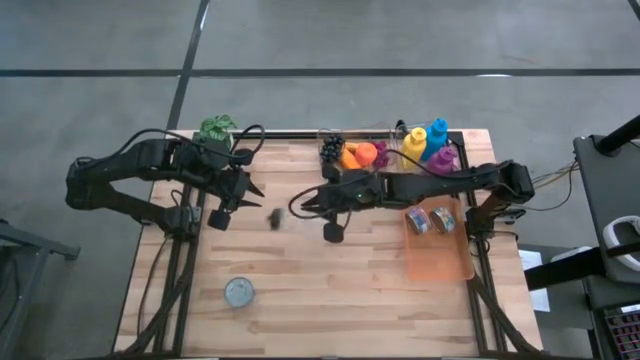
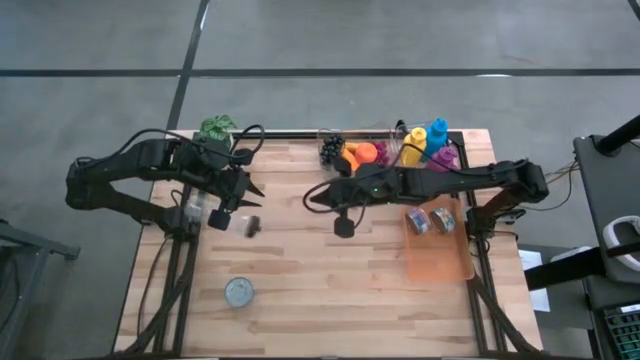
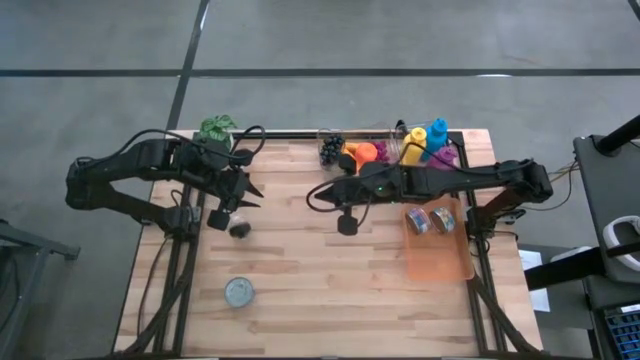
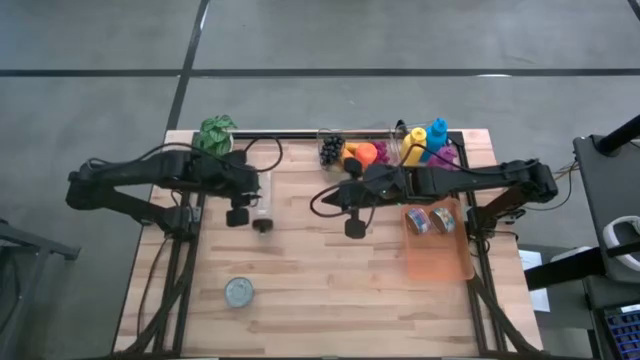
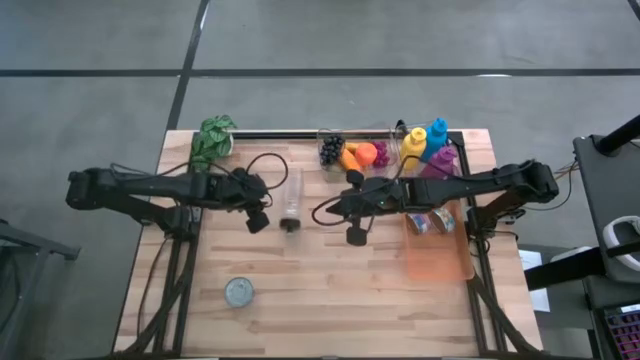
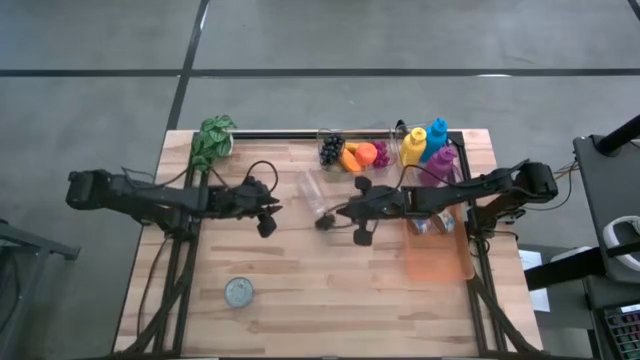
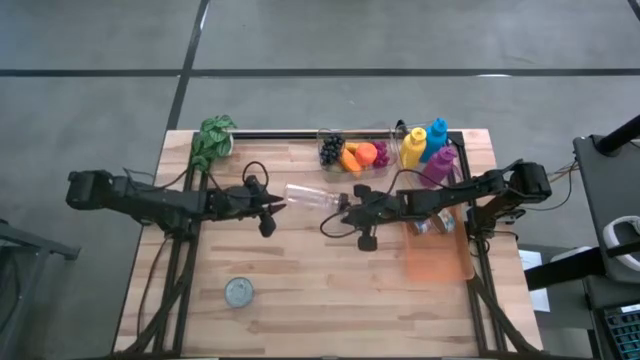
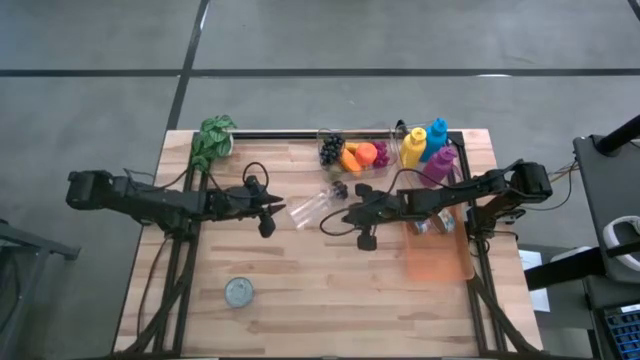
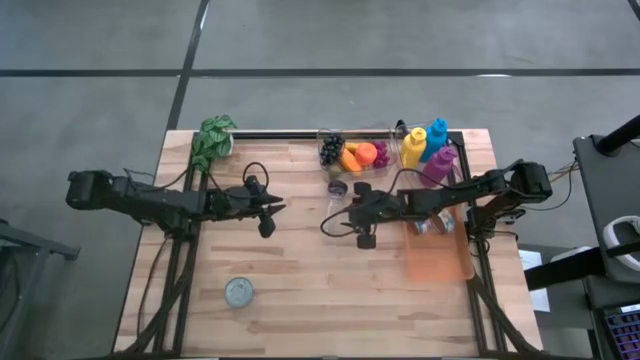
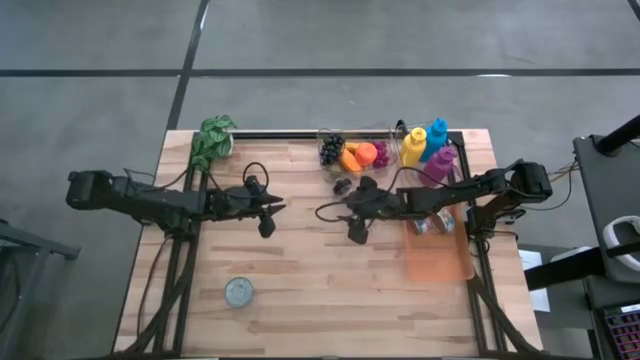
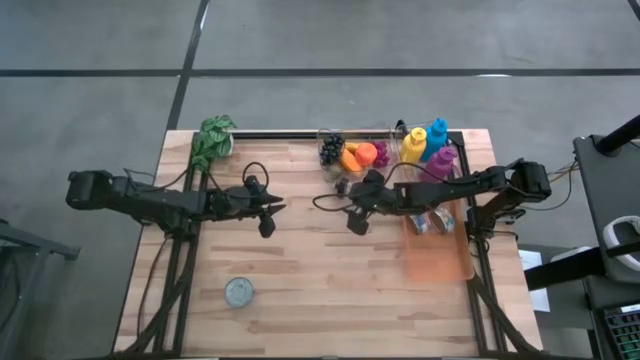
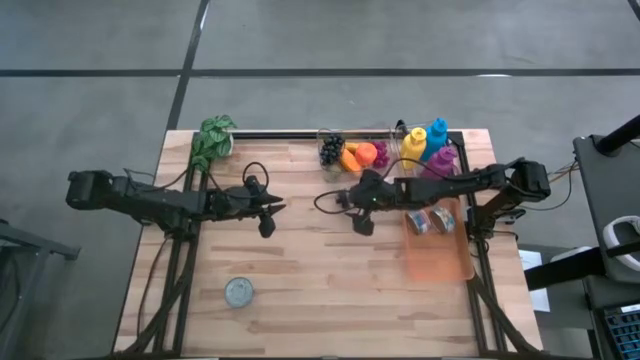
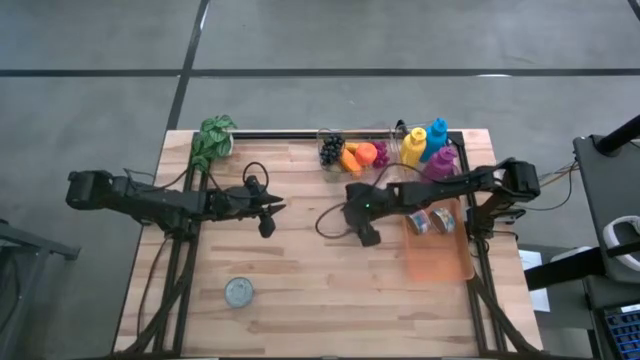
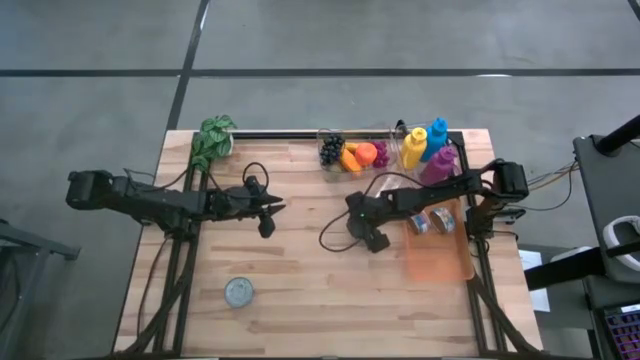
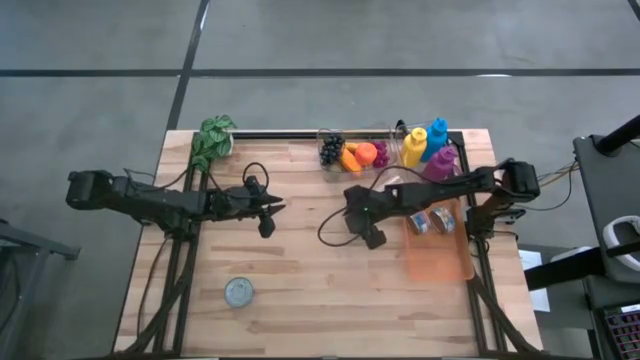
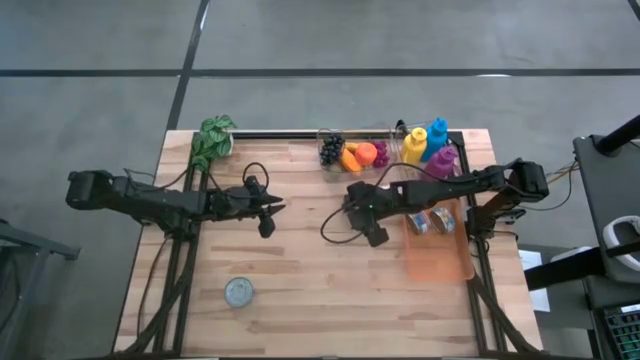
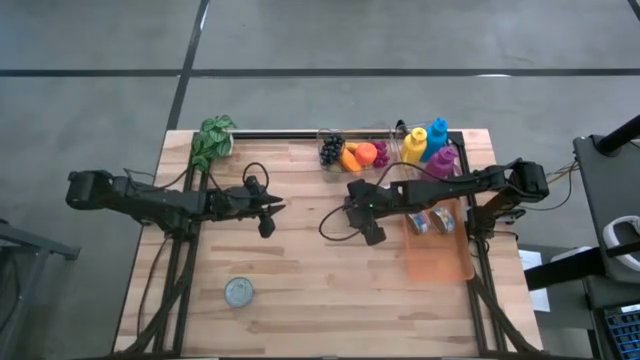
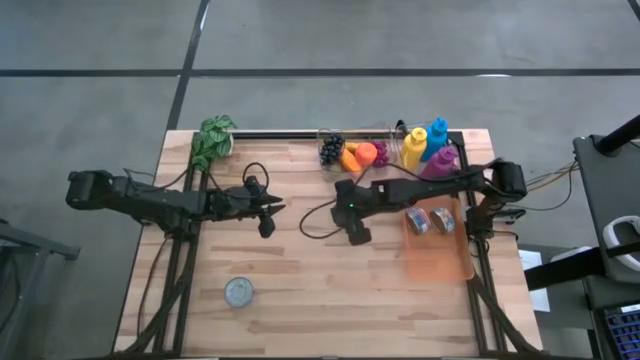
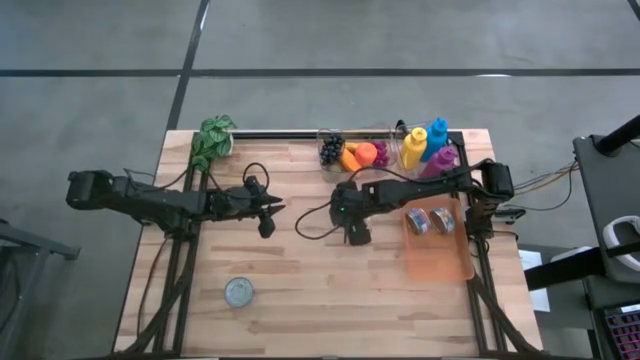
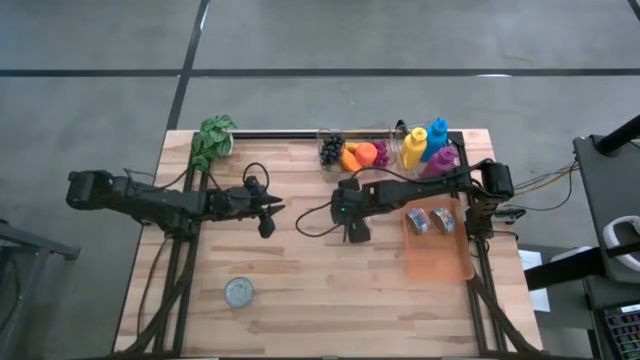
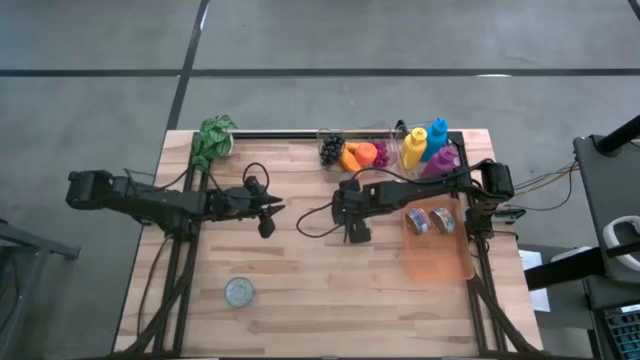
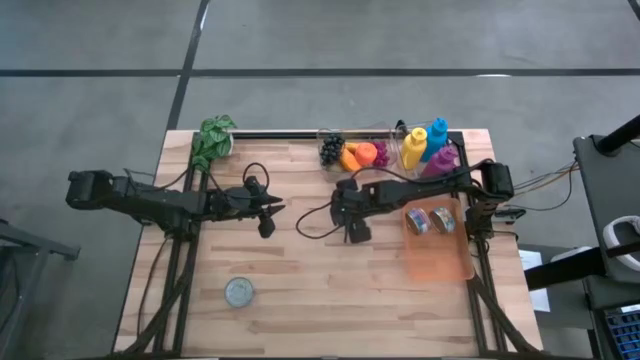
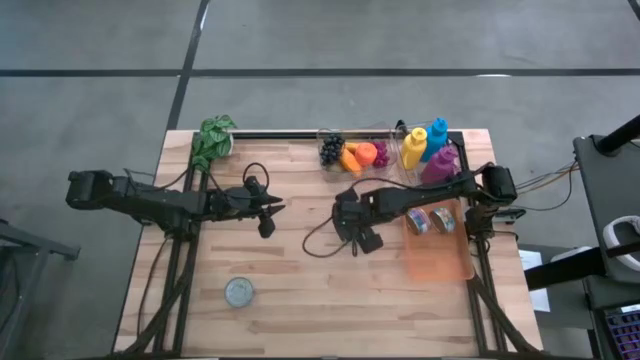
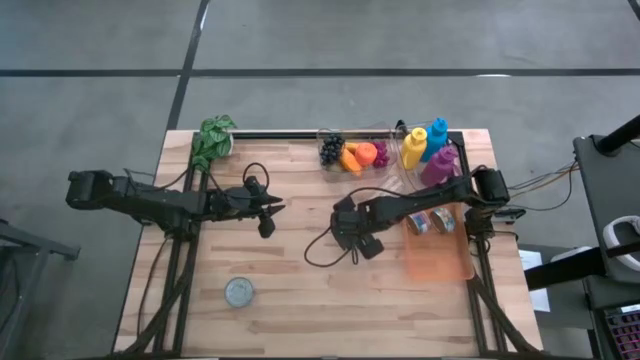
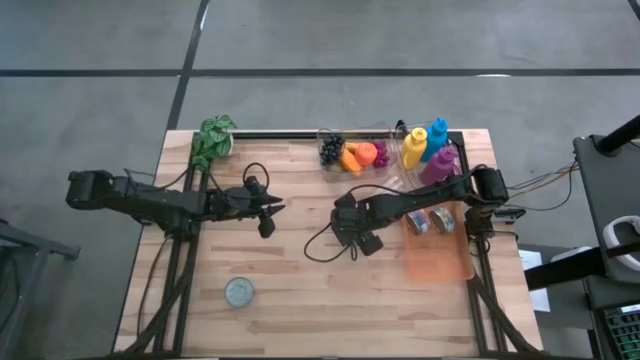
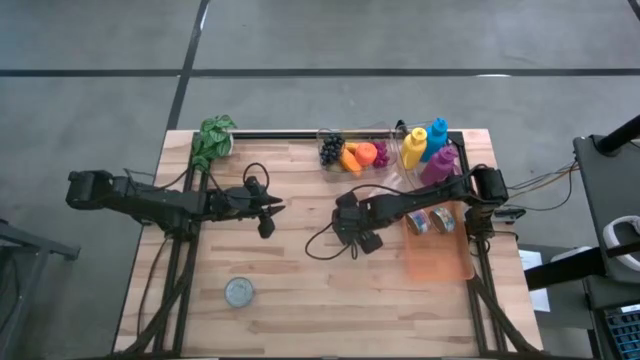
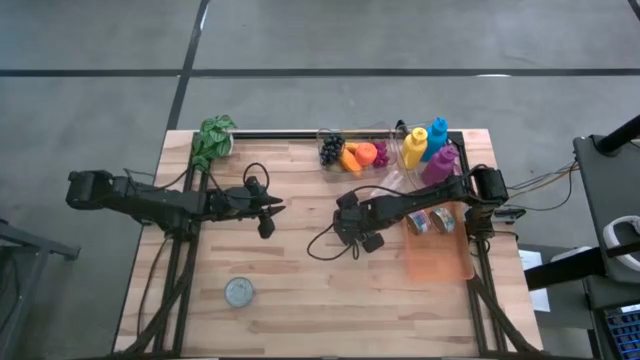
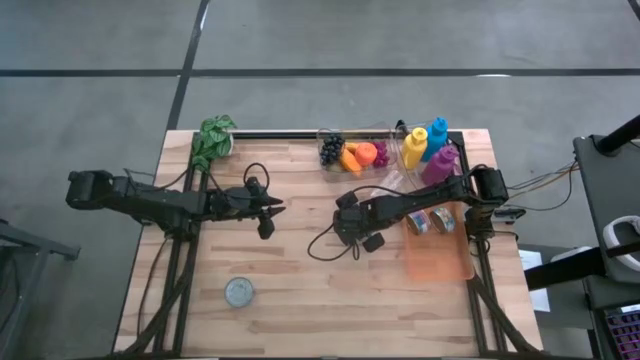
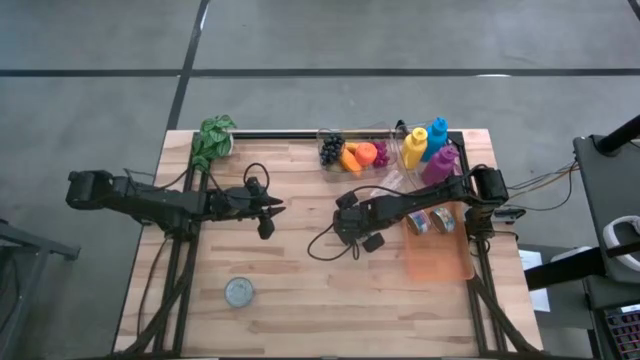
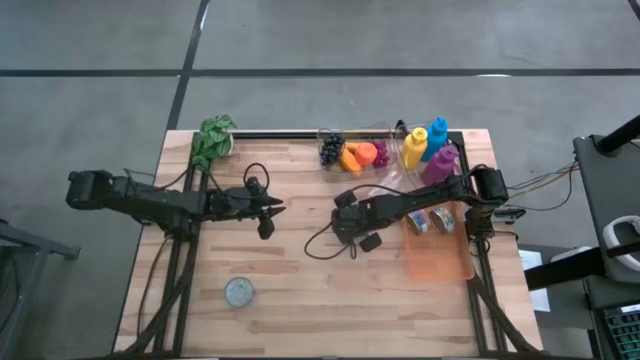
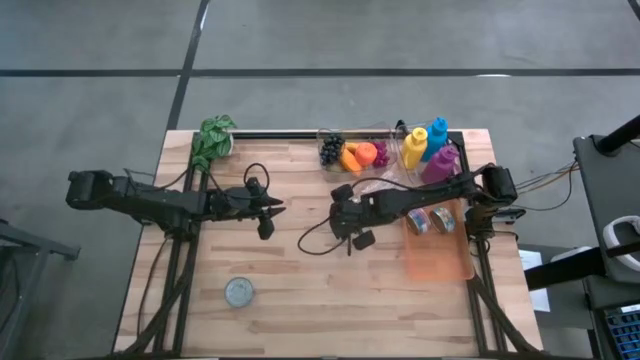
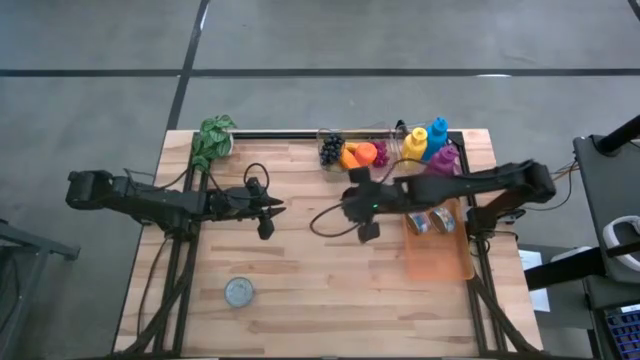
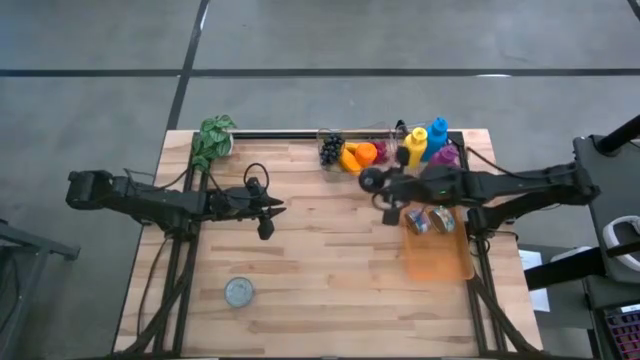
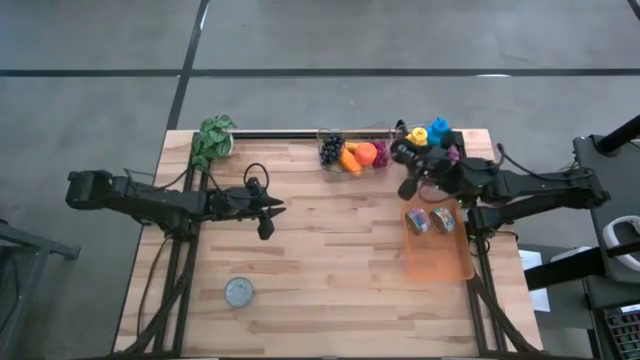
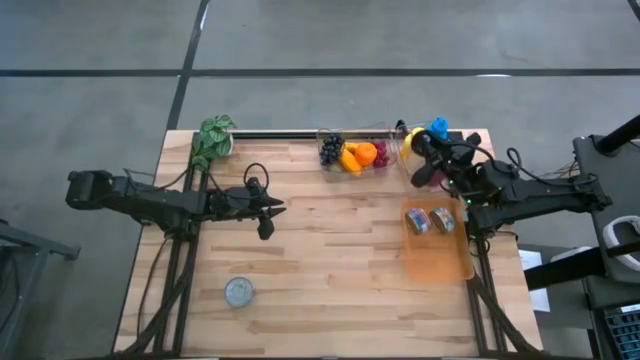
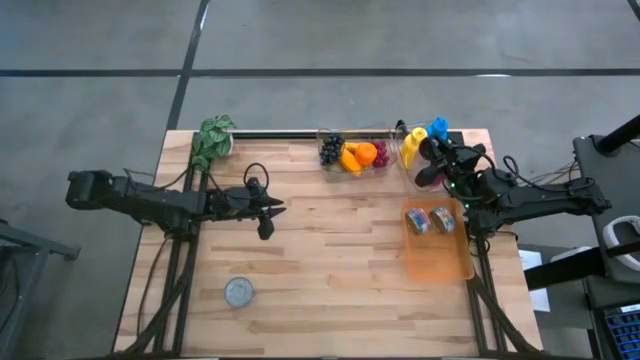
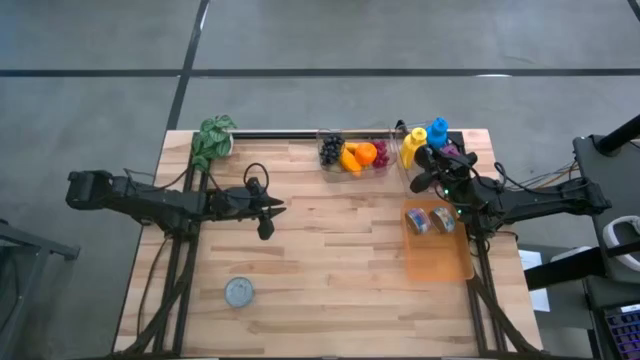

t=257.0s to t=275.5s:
Task: Pick & Place Food Item
Put the black water bottle into the right transparent bin
